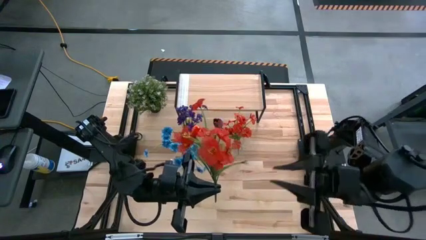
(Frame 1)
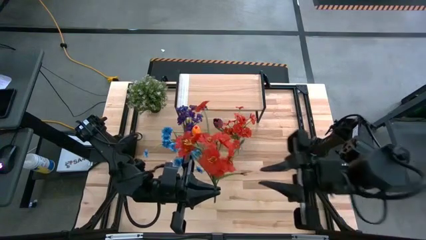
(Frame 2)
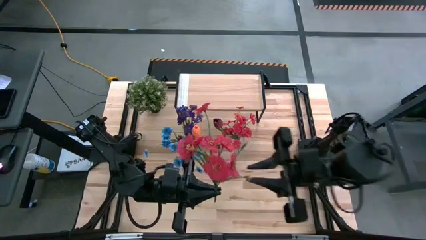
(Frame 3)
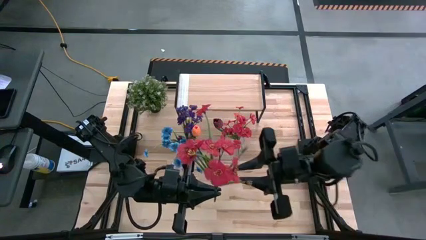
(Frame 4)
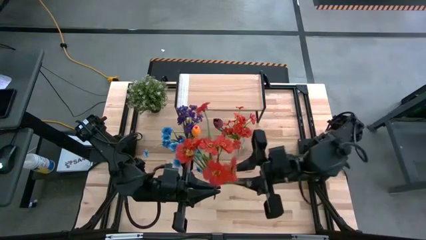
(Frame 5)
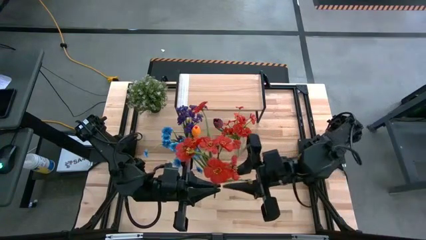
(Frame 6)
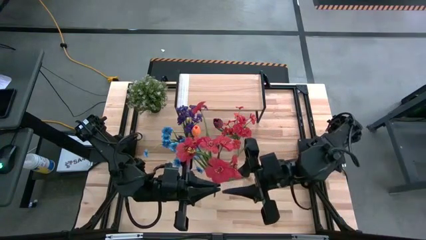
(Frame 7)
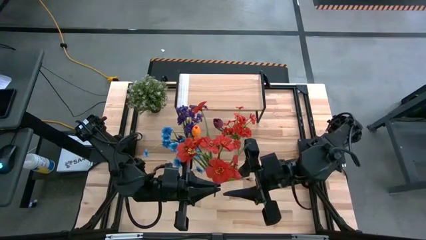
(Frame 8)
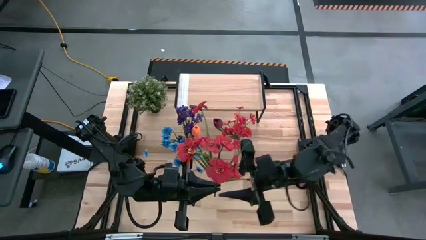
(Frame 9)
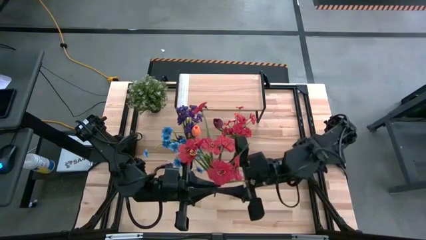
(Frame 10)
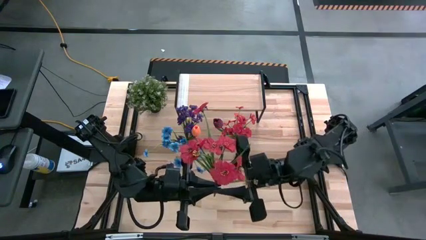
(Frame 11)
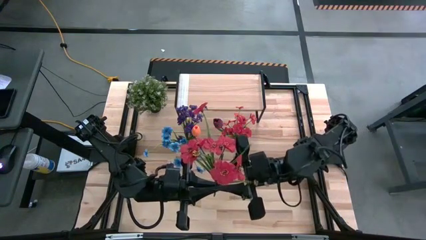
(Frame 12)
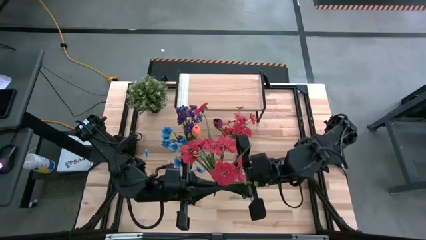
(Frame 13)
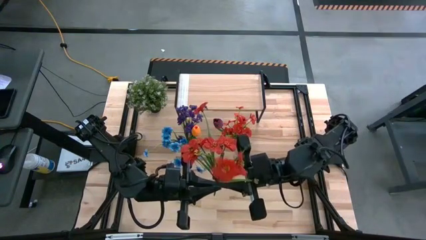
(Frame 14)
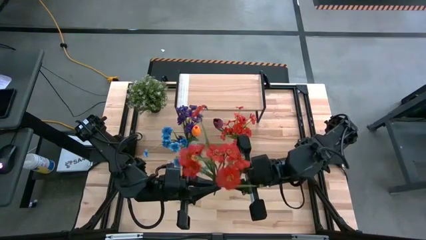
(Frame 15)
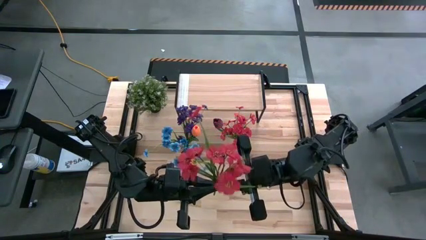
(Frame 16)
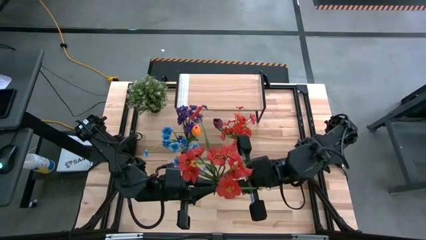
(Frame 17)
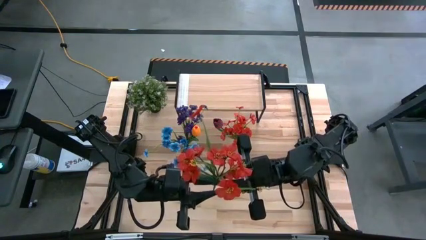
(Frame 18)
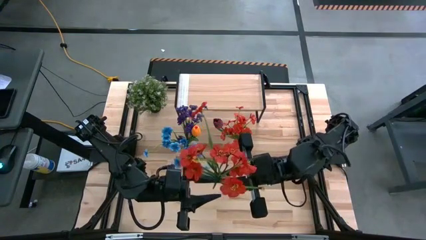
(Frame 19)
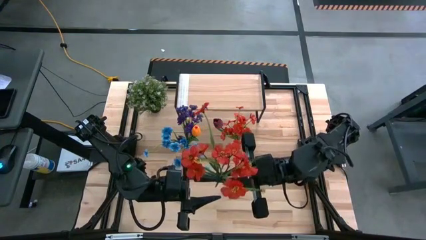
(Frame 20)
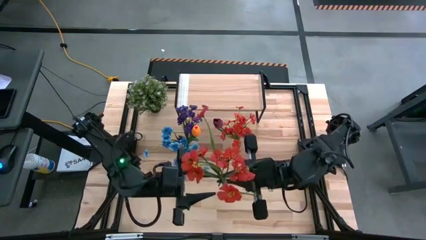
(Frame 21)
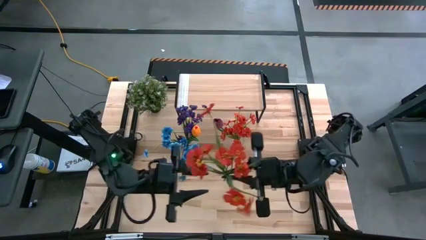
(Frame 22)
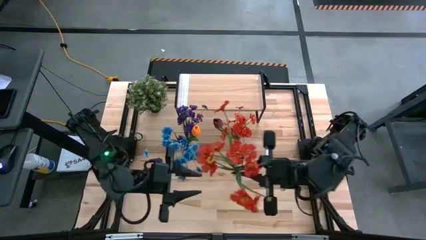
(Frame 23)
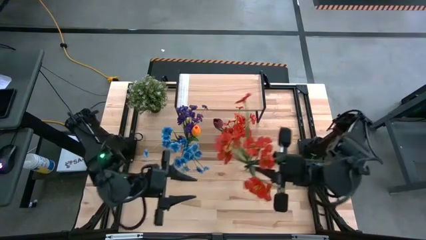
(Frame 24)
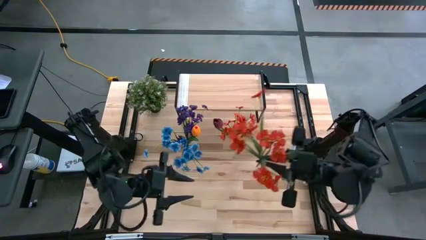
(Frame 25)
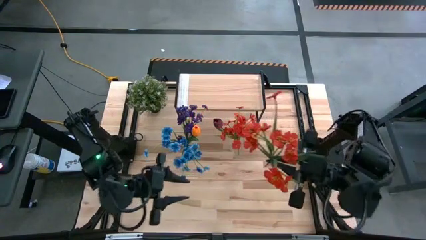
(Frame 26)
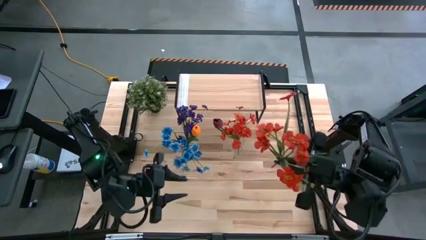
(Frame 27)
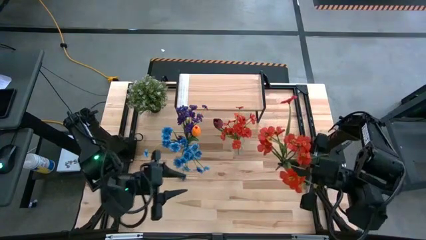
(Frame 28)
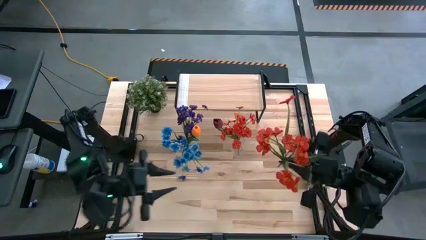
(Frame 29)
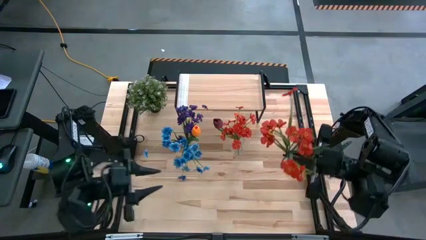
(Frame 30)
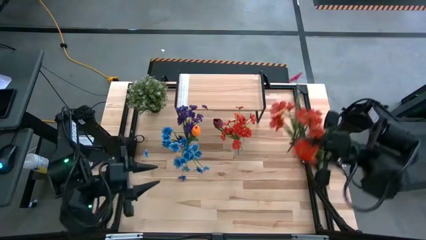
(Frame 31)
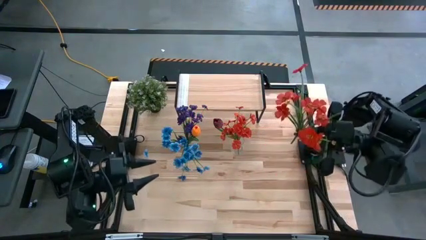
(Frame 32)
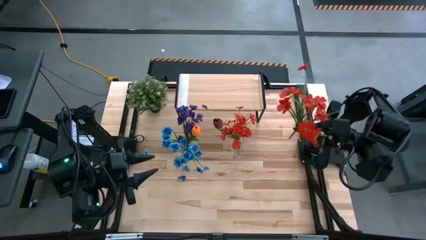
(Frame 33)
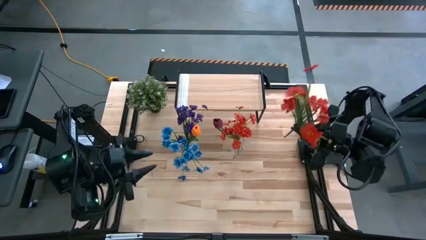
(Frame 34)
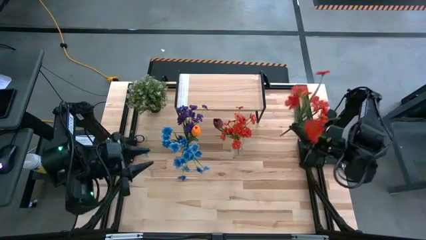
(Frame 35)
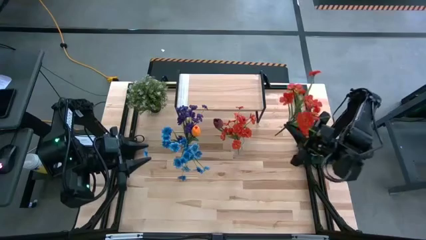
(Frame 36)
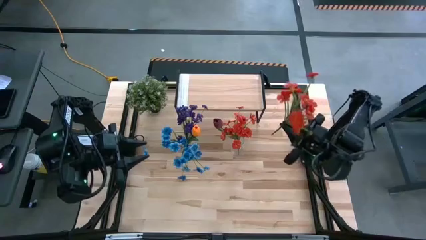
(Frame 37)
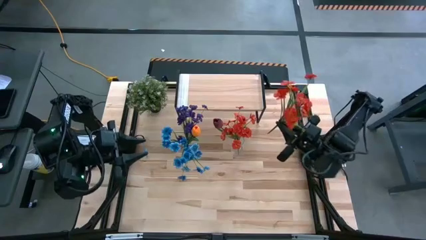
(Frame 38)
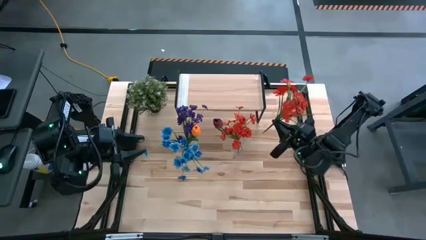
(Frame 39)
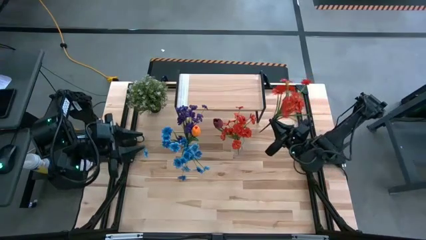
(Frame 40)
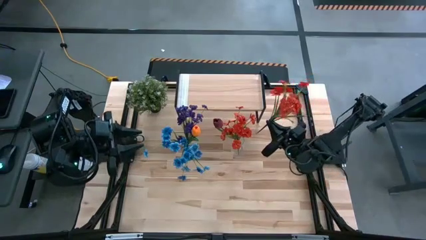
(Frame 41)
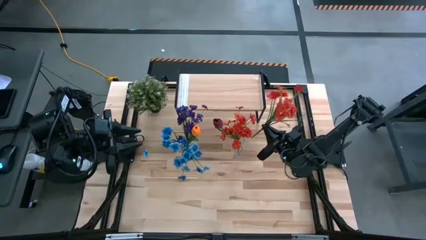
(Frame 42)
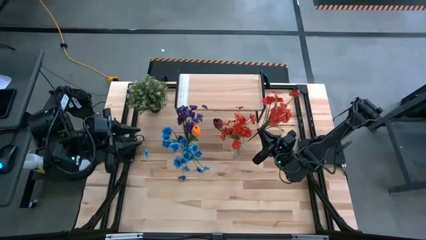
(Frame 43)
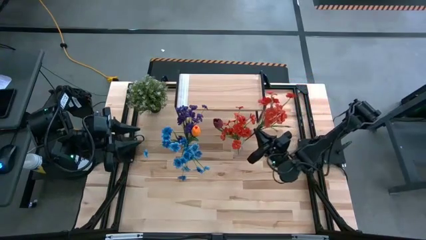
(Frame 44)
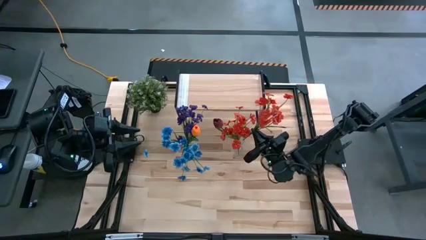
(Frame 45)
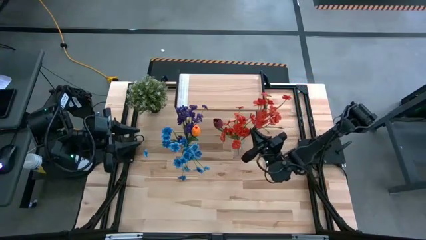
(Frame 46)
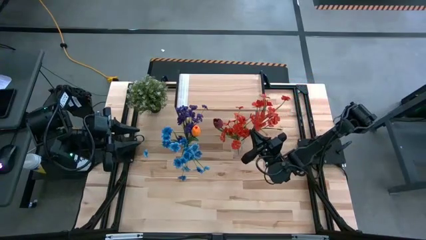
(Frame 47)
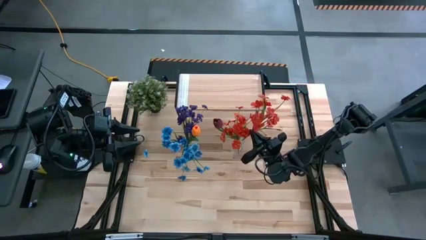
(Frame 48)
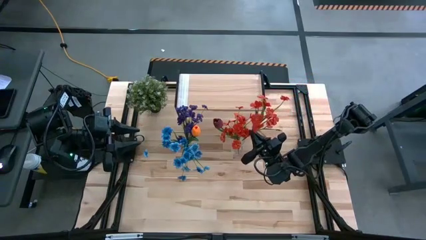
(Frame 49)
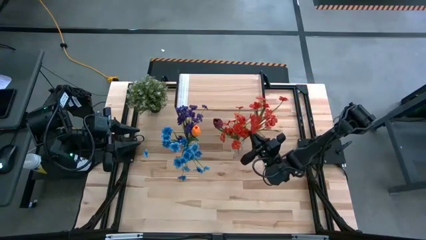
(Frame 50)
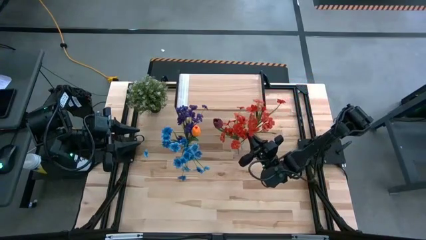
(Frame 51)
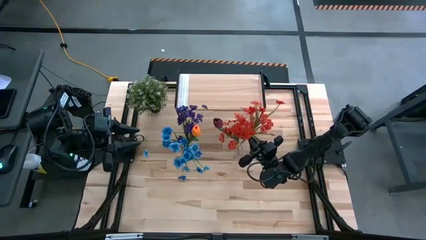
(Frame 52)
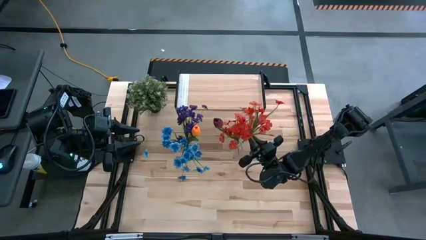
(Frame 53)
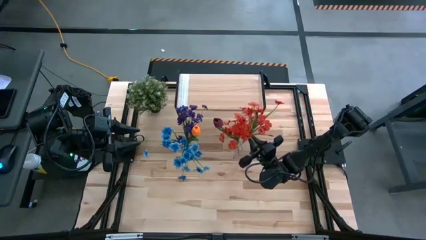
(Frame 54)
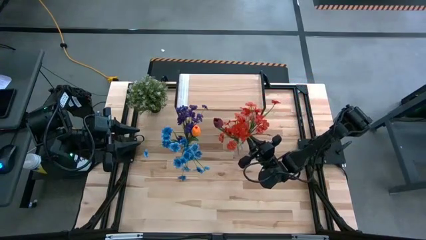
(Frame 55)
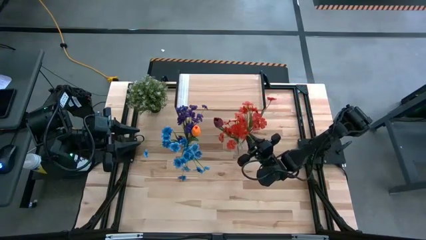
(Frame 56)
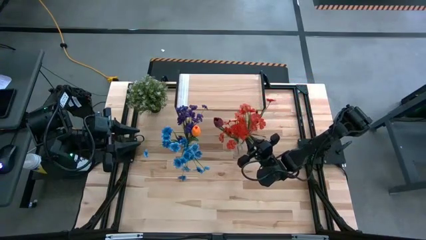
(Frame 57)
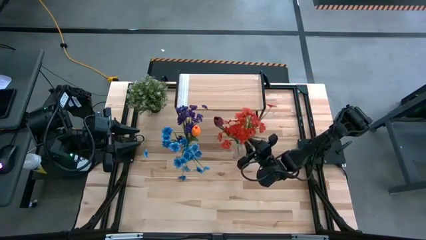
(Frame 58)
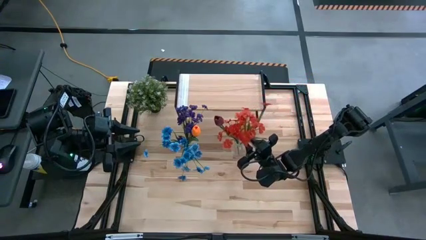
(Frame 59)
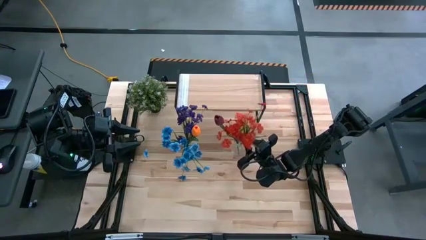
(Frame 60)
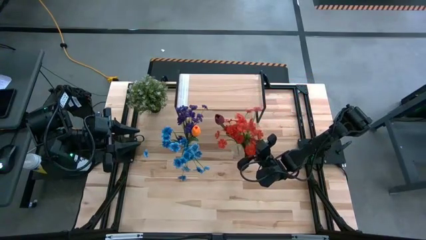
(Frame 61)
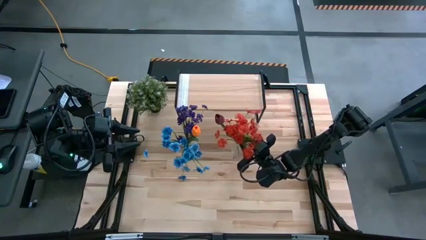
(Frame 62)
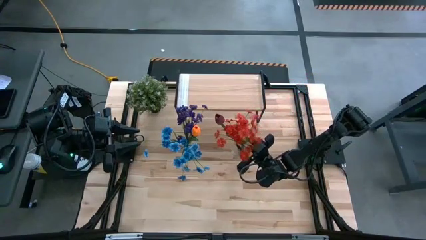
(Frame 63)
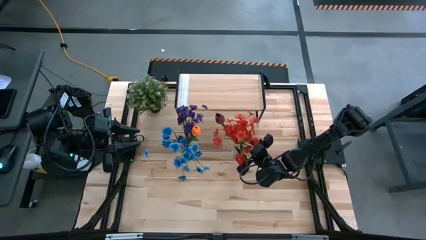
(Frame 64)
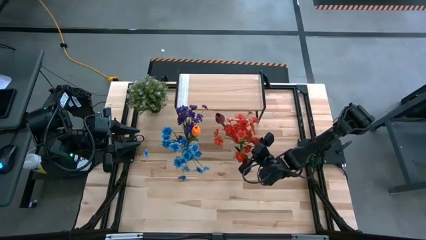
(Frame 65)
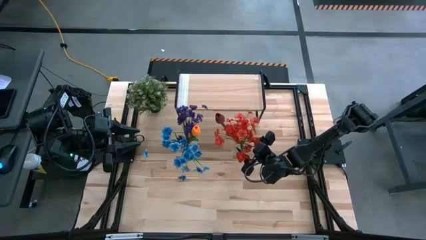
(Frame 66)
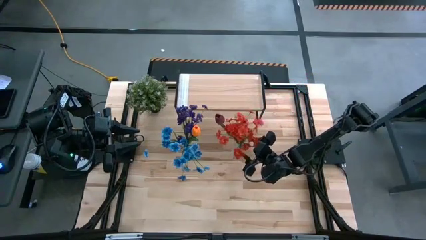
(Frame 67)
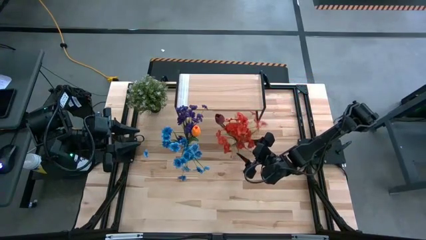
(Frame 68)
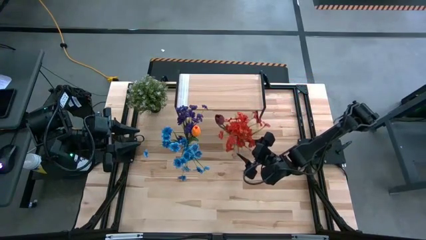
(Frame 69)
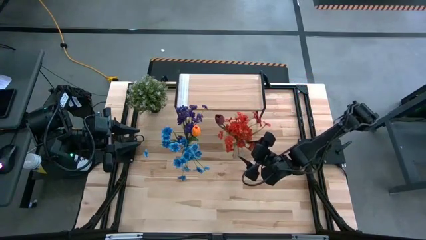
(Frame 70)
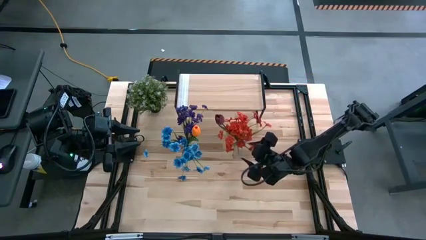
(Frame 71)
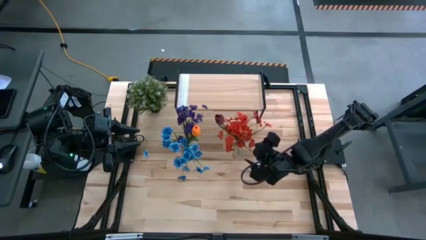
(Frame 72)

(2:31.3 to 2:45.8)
Task: Pick and place flowers into a vace then onto a shelf
Put the red flowers into the right transparent vase
